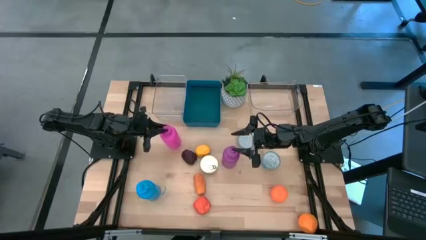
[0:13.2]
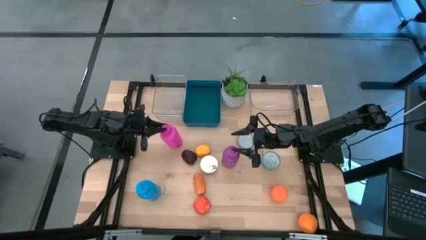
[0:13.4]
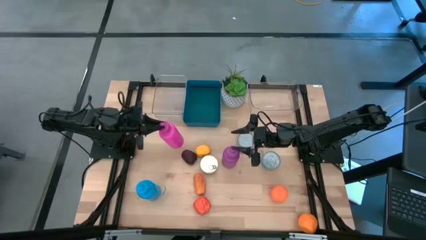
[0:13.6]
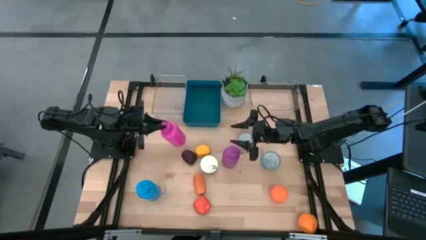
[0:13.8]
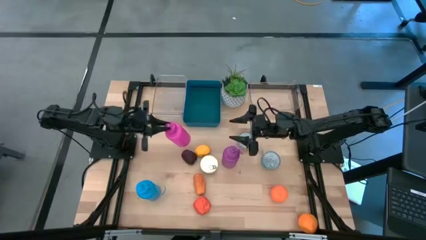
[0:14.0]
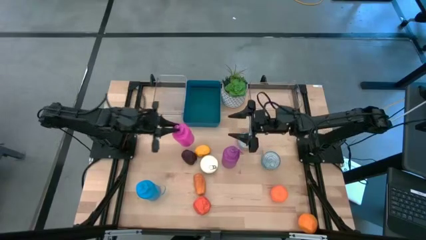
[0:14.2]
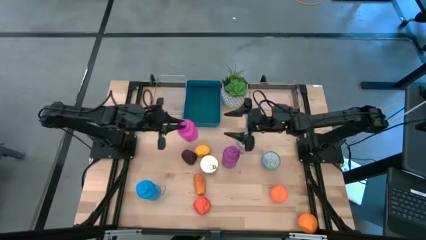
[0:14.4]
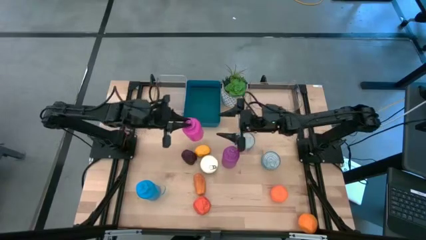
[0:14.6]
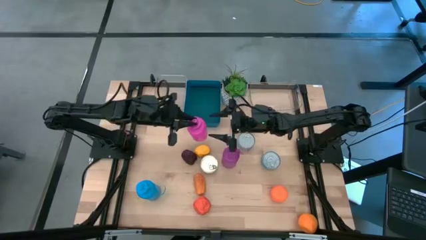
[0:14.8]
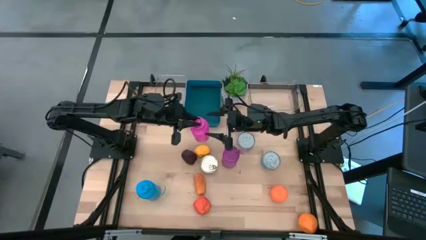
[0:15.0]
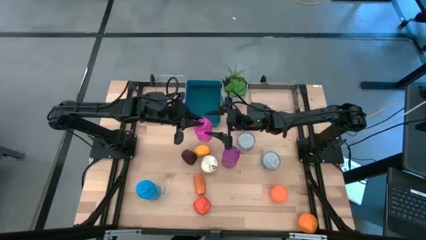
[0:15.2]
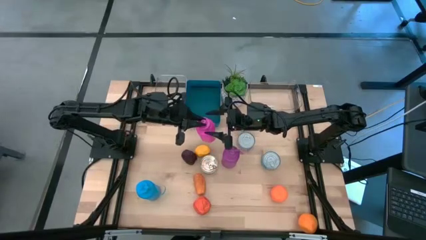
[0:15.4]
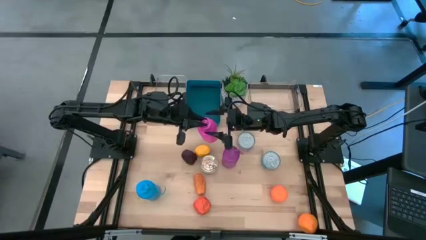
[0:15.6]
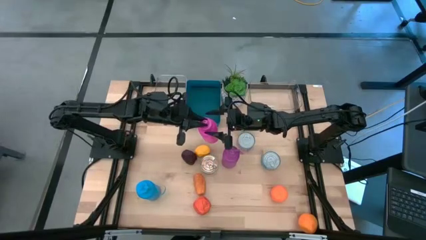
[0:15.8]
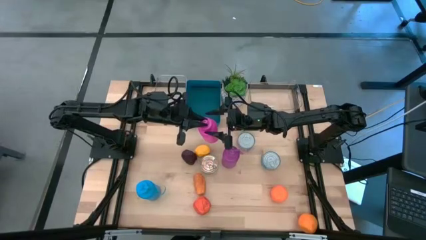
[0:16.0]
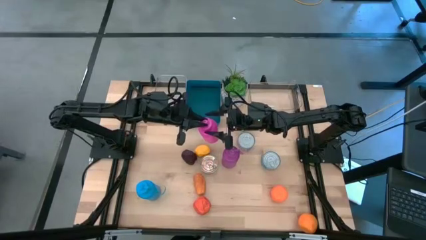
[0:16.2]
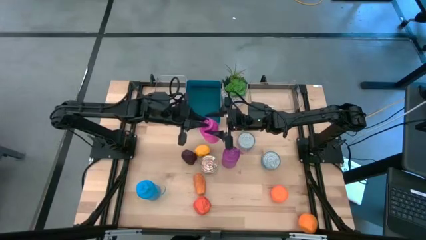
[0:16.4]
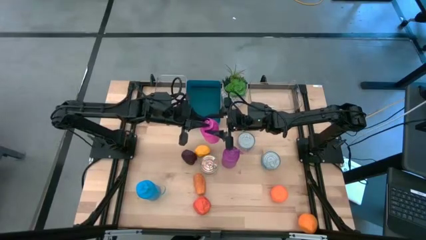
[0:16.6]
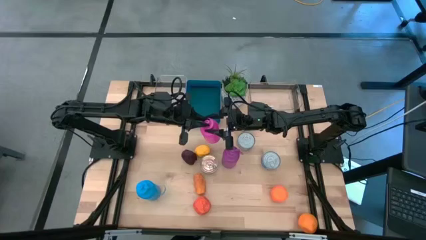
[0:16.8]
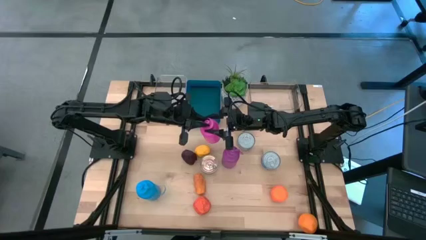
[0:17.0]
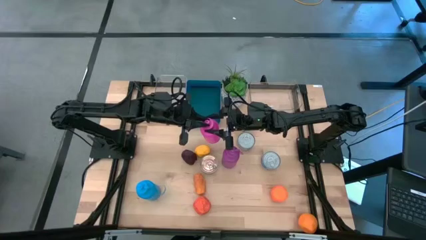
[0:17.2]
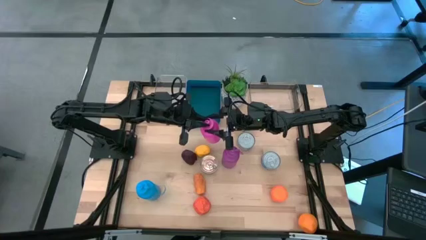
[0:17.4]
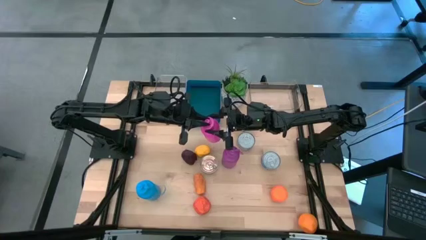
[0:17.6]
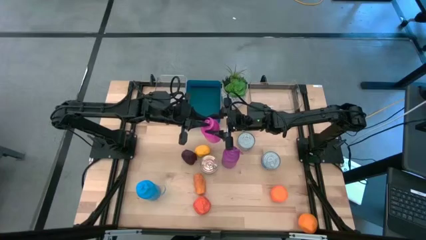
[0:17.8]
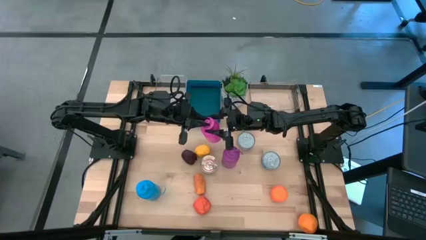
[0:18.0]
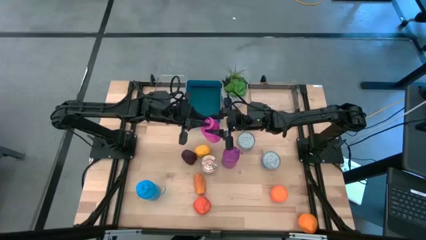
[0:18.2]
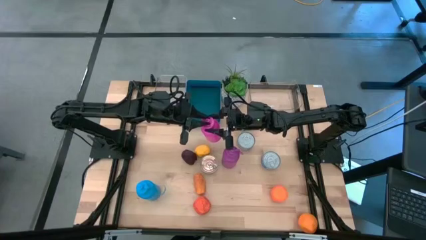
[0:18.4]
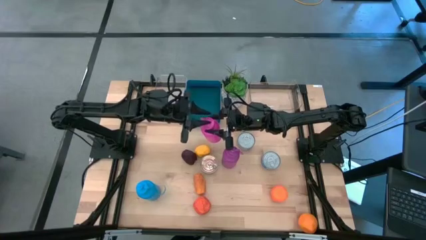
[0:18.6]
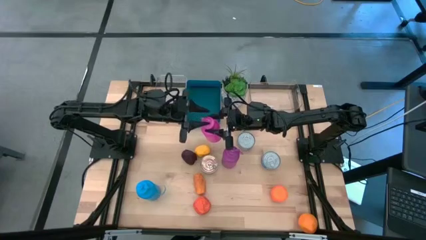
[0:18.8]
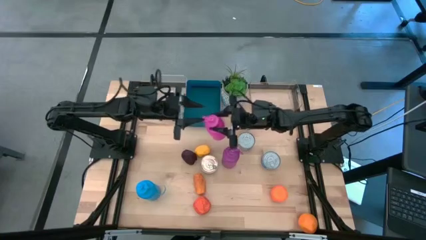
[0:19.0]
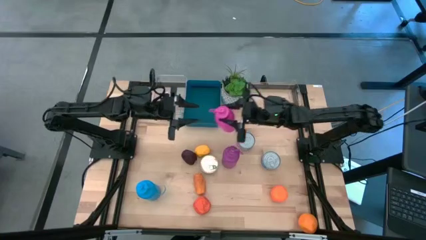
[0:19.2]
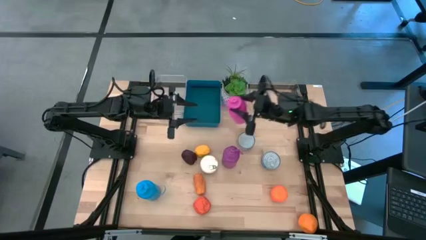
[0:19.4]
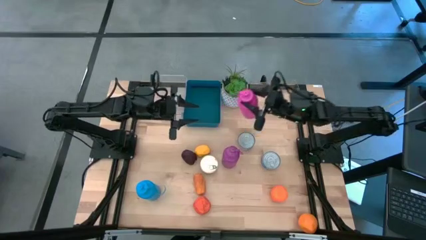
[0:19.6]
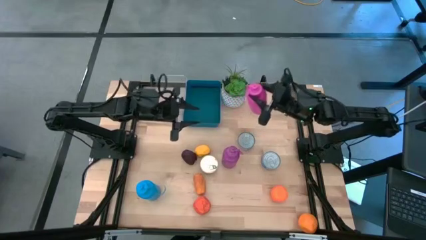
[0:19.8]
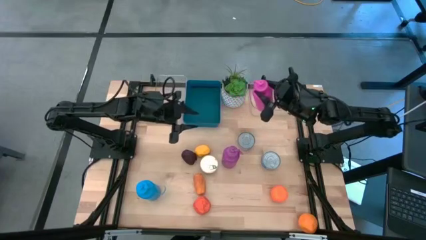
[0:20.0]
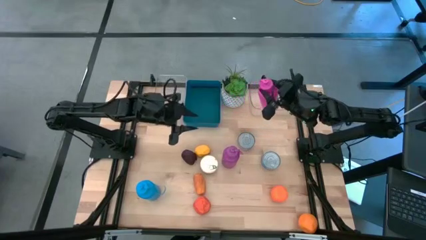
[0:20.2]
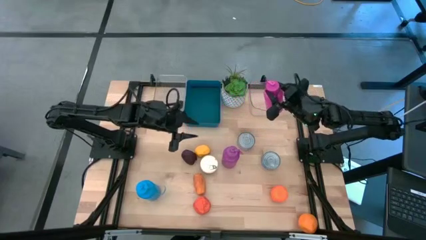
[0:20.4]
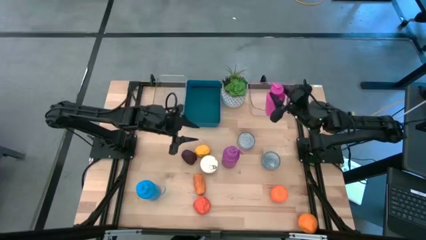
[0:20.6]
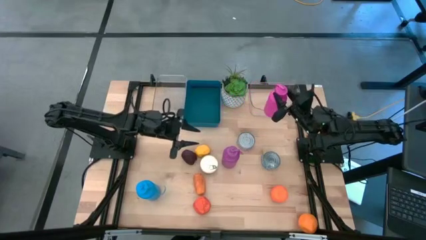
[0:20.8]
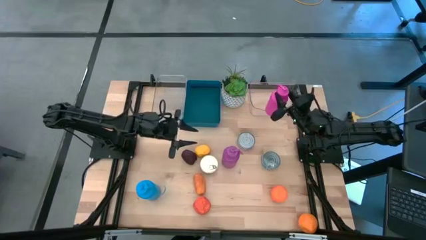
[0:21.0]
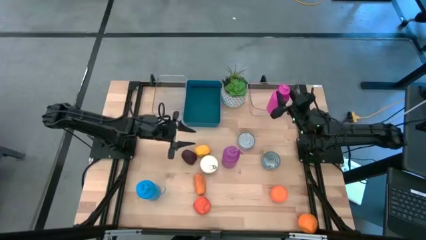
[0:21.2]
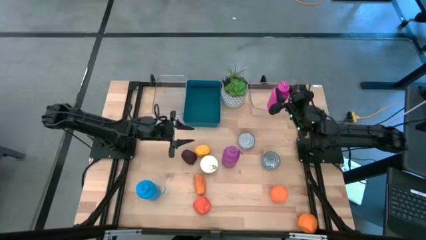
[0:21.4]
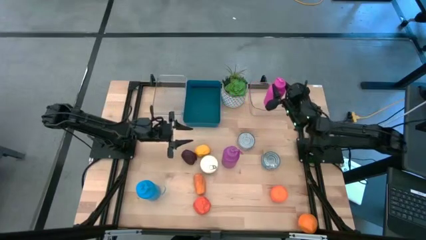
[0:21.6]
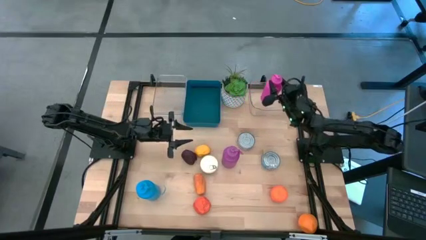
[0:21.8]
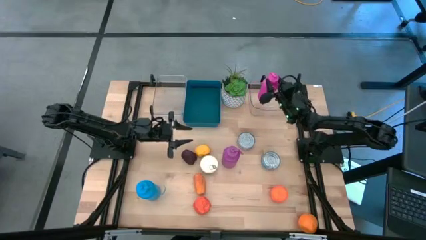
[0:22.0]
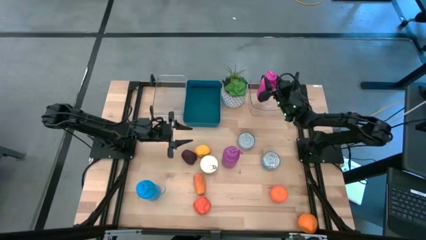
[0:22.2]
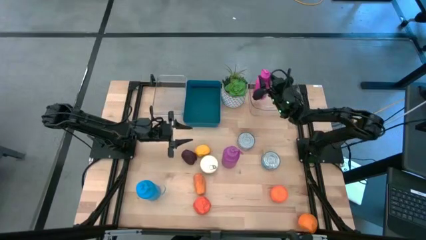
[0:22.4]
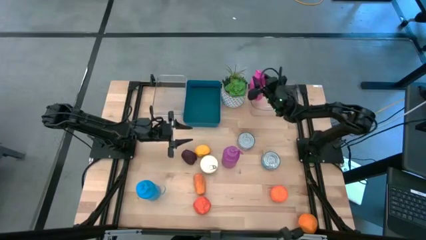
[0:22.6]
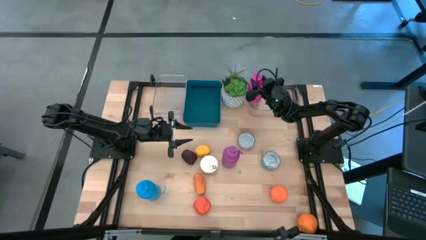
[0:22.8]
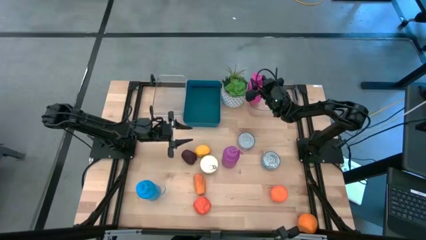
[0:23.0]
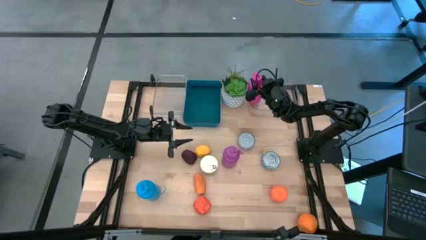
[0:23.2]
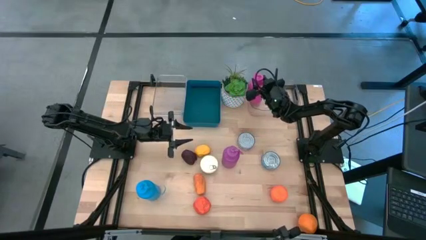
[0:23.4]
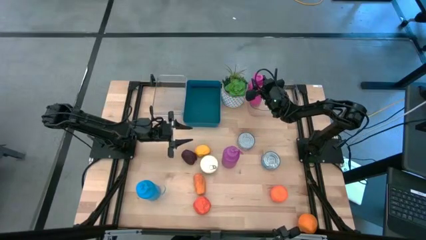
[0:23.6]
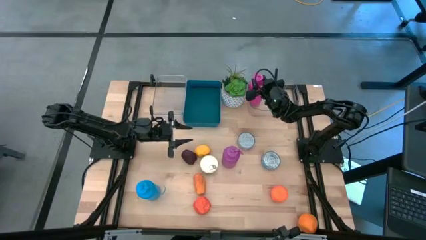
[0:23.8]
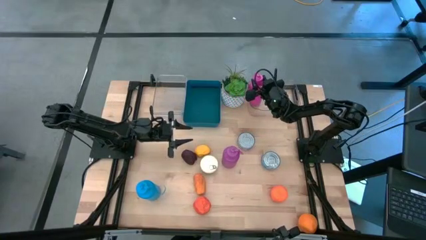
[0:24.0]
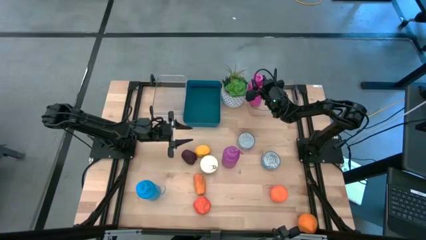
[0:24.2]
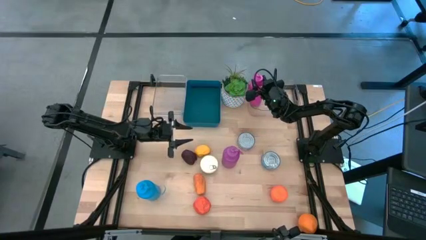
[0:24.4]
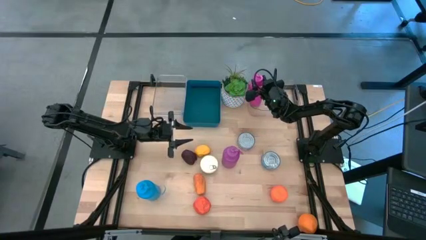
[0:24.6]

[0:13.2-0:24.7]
Task: Pick & Place Food Item
Put the pink bottle into the right transparent bin

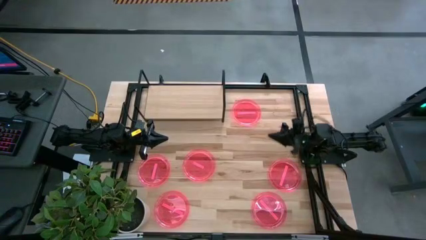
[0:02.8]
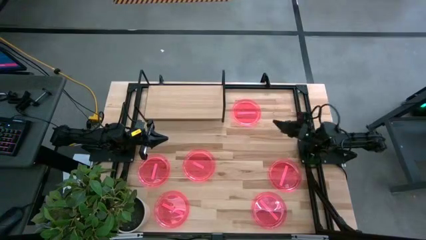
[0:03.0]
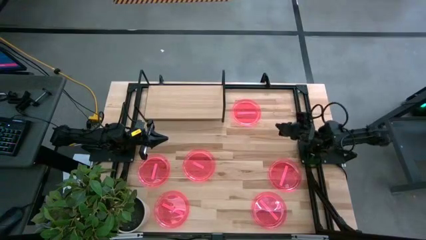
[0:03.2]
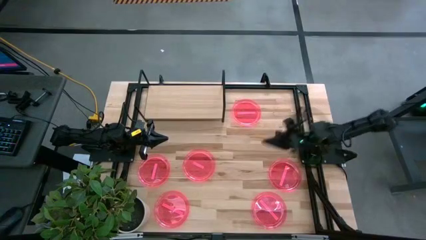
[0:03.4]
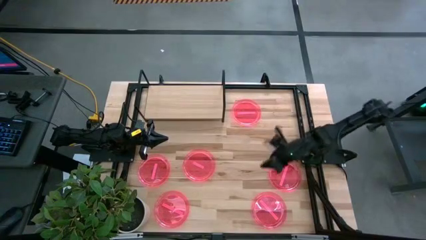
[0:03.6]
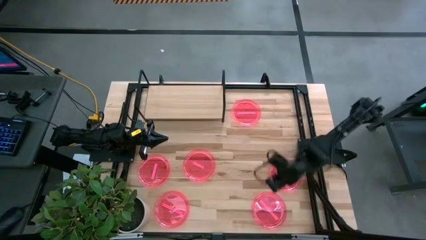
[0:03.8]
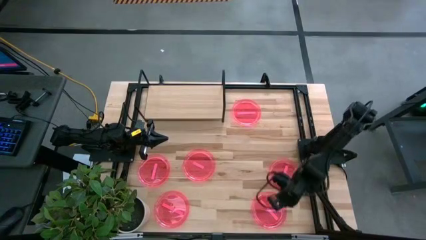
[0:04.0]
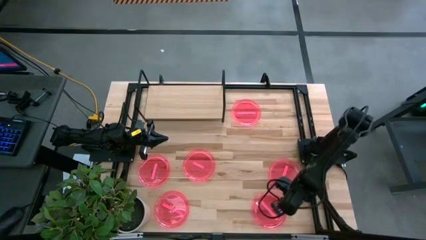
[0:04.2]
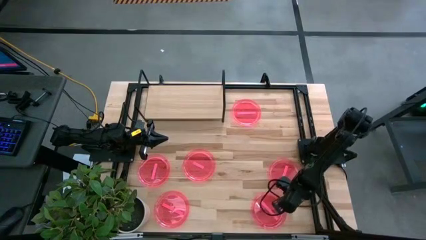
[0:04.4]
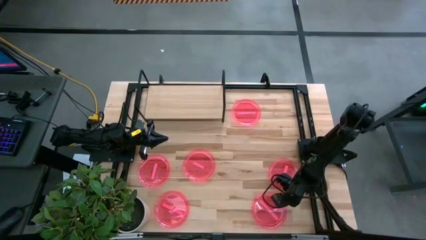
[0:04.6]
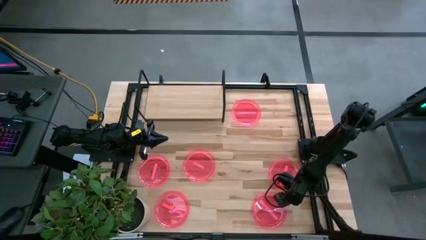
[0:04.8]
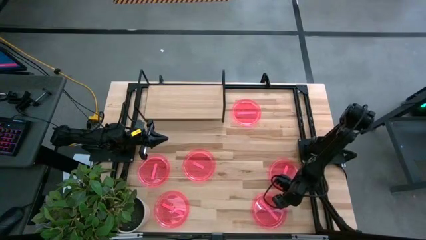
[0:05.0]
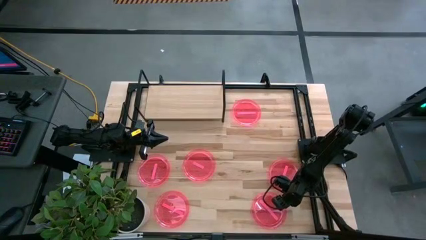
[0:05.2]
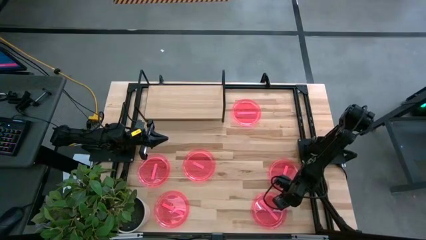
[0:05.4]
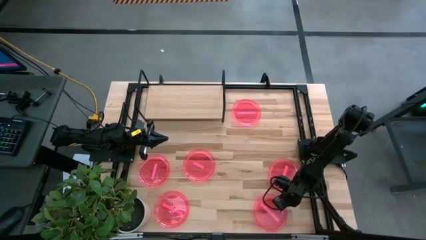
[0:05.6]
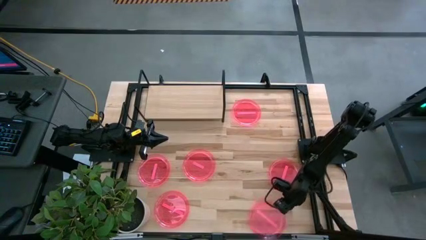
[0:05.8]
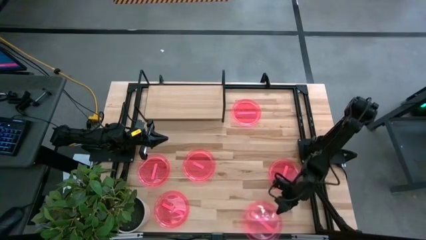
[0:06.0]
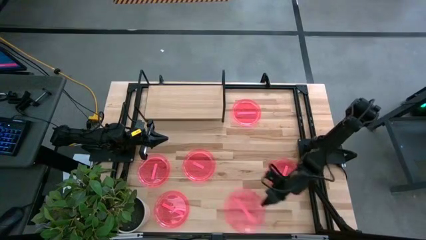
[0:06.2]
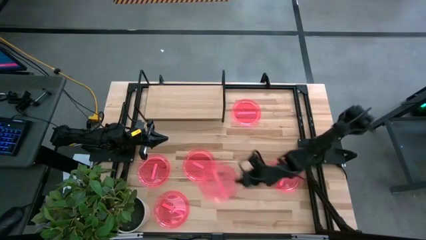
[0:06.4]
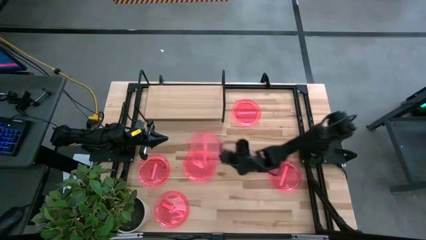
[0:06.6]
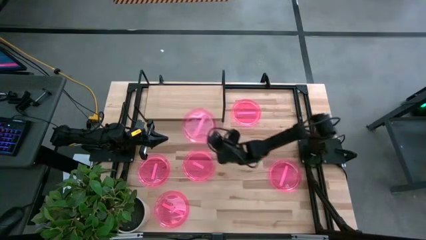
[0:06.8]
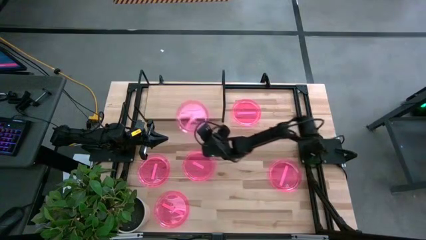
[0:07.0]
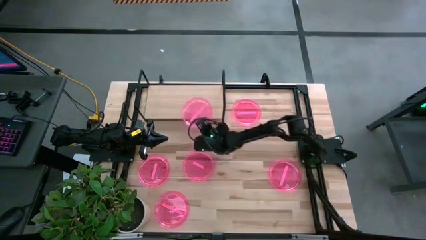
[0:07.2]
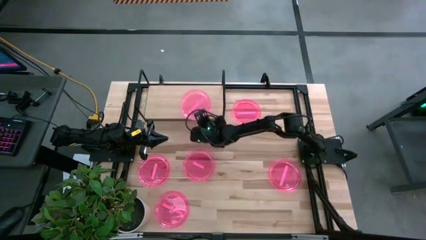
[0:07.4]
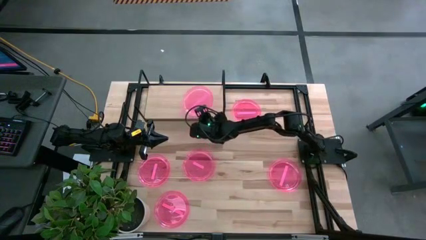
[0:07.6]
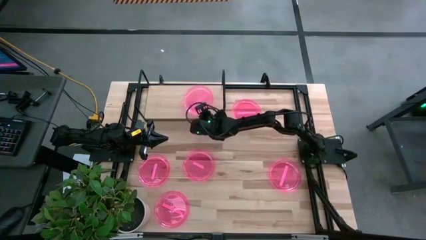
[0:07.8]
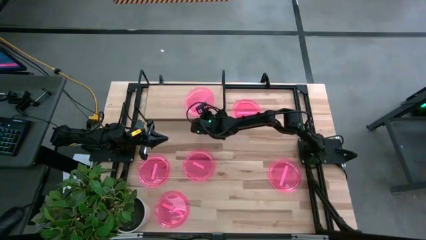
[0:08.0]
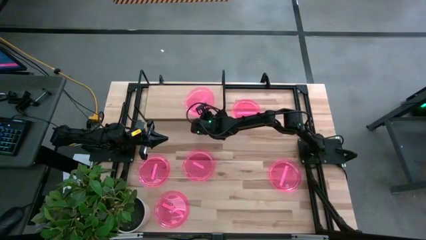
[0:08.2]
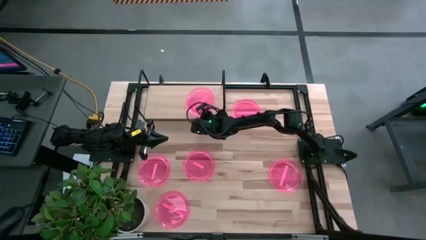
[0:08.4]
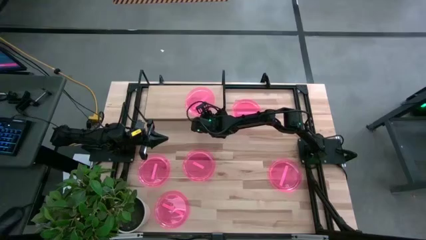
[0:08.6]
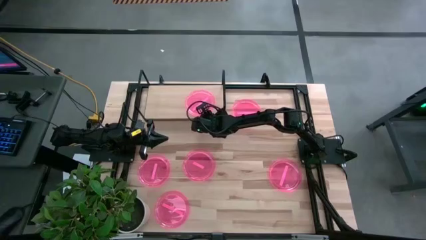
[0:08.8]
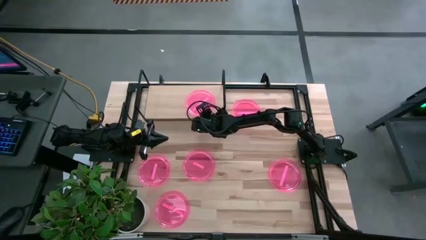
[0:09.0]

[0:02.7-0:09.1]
Task: Place and stack plates onto a shelf
Put the pink plate on the shelf
